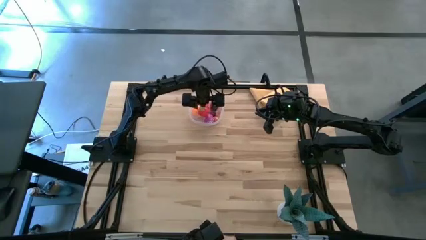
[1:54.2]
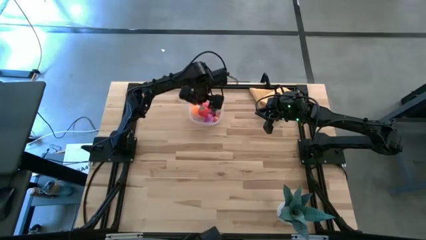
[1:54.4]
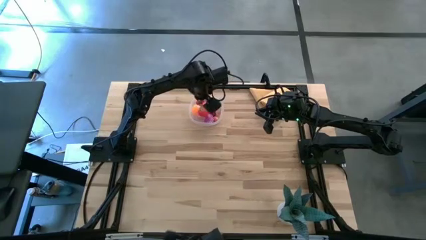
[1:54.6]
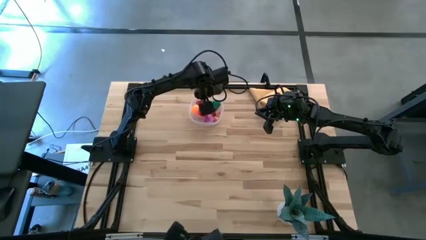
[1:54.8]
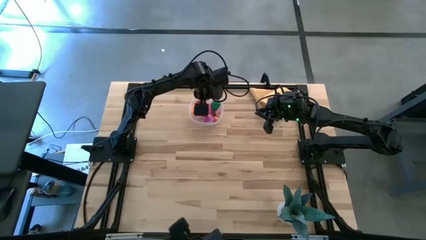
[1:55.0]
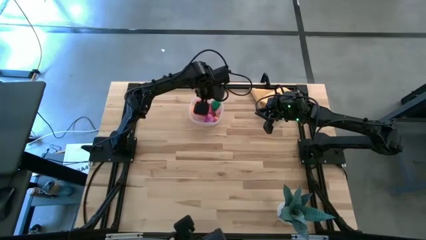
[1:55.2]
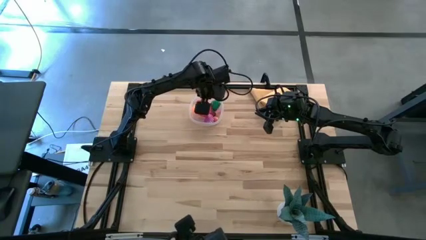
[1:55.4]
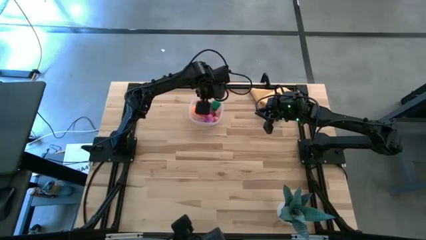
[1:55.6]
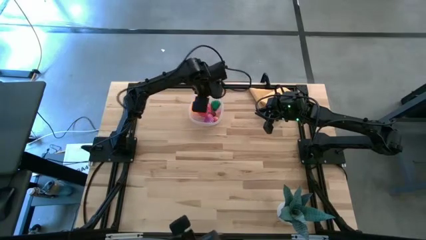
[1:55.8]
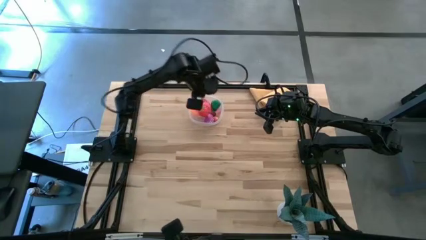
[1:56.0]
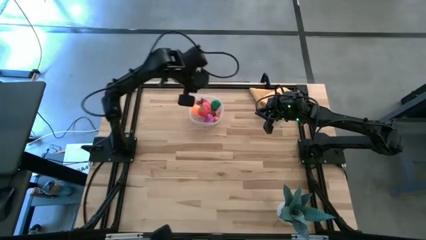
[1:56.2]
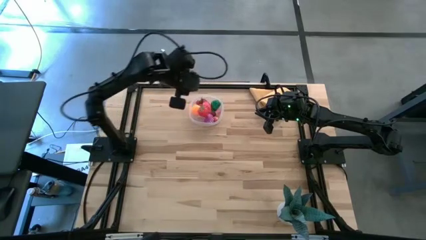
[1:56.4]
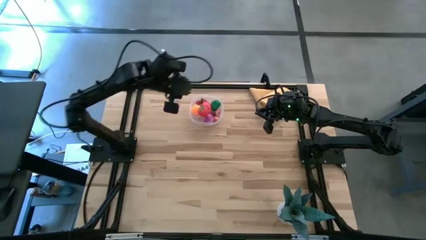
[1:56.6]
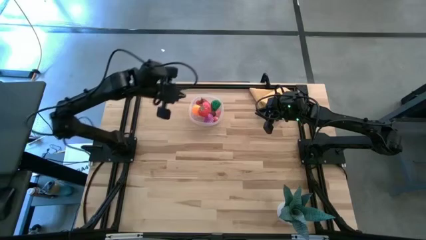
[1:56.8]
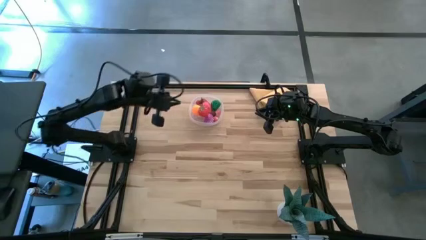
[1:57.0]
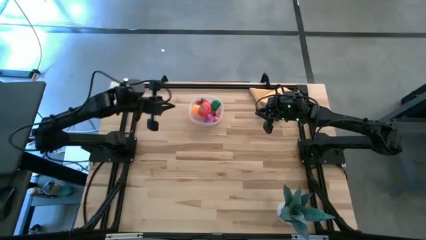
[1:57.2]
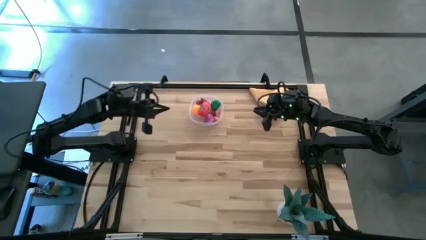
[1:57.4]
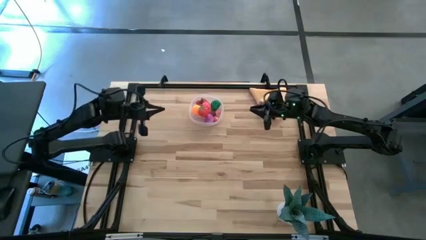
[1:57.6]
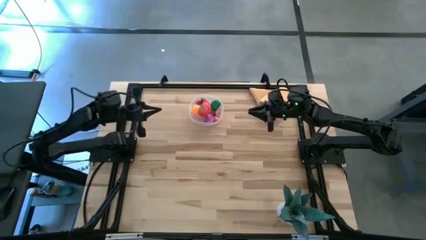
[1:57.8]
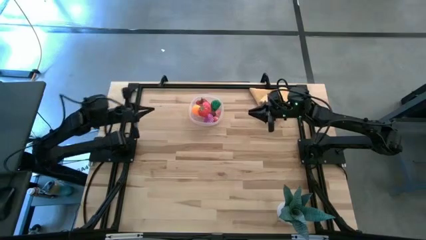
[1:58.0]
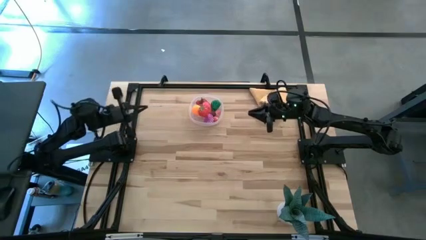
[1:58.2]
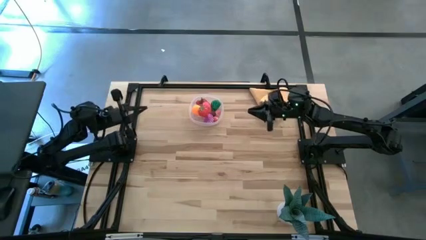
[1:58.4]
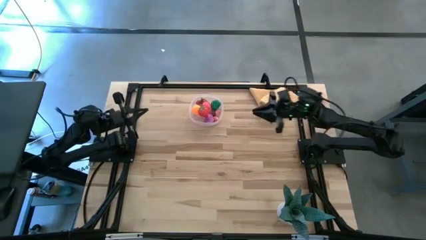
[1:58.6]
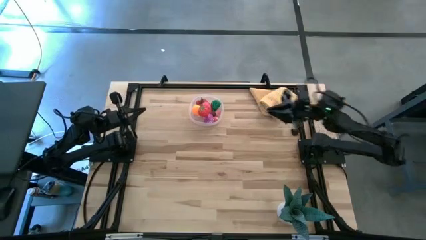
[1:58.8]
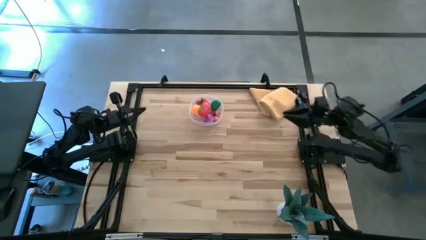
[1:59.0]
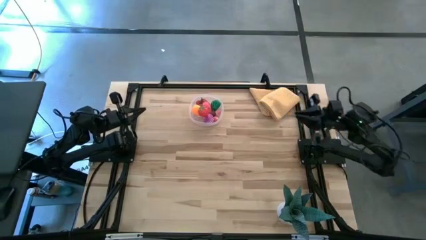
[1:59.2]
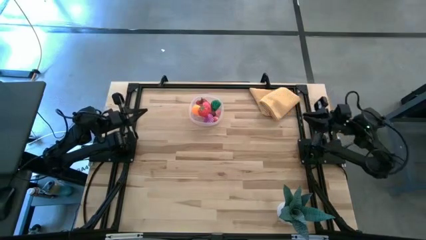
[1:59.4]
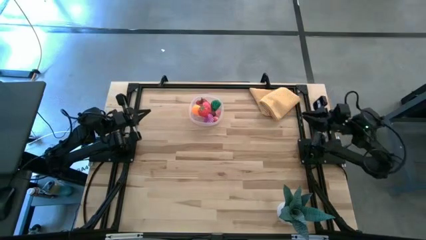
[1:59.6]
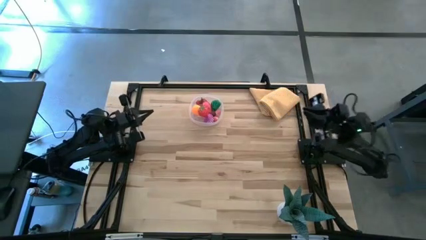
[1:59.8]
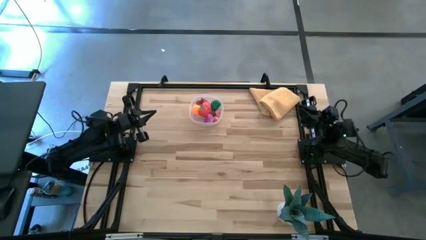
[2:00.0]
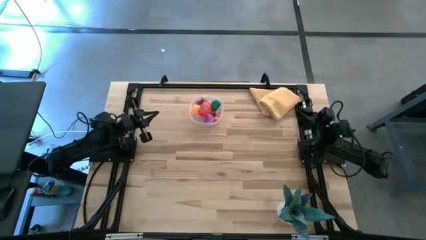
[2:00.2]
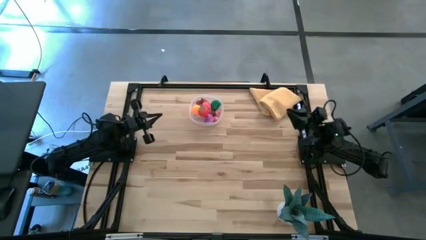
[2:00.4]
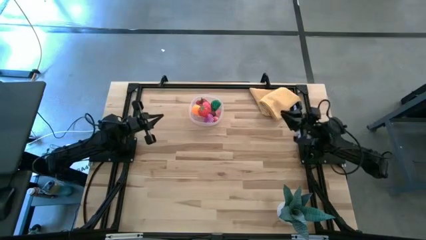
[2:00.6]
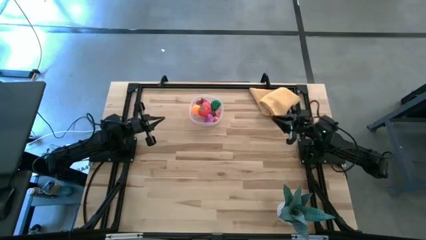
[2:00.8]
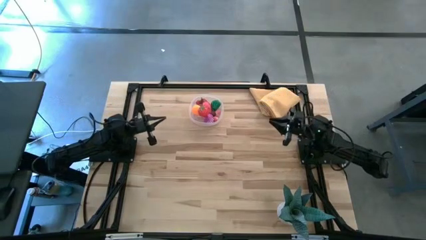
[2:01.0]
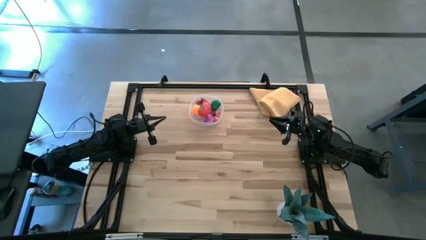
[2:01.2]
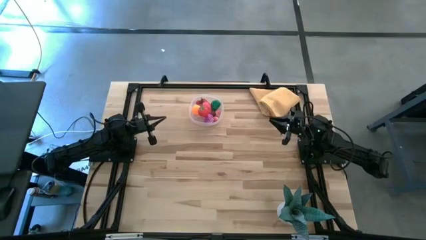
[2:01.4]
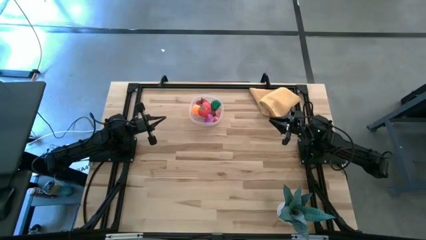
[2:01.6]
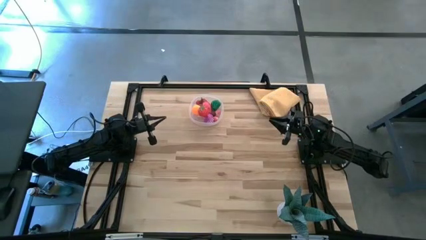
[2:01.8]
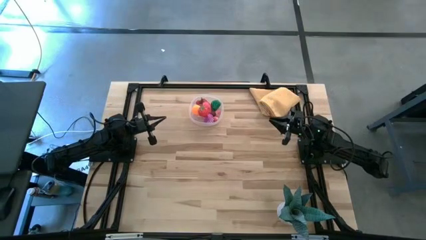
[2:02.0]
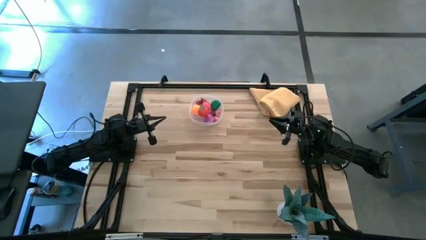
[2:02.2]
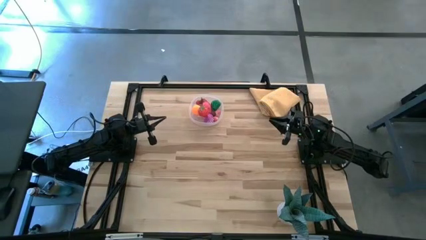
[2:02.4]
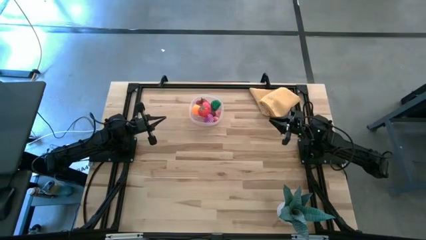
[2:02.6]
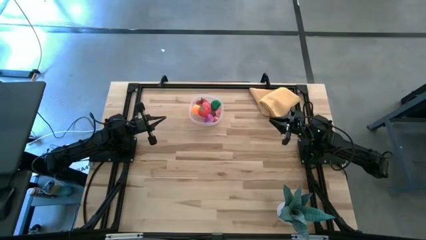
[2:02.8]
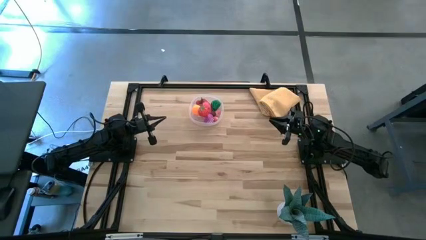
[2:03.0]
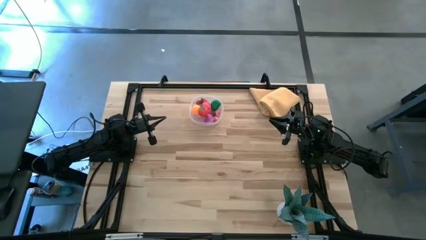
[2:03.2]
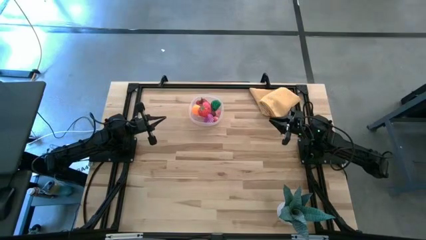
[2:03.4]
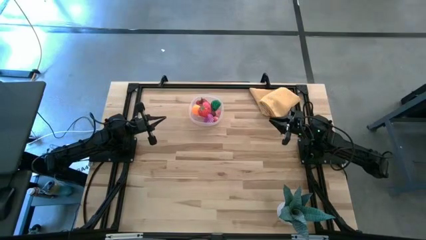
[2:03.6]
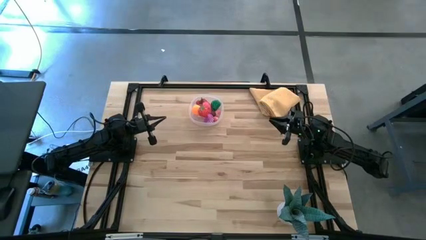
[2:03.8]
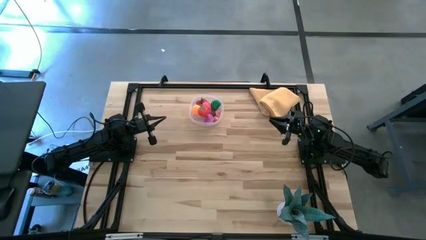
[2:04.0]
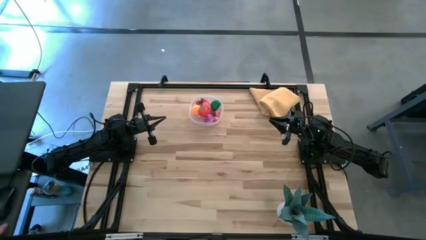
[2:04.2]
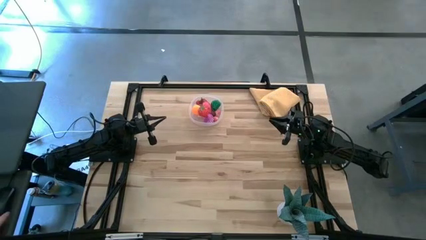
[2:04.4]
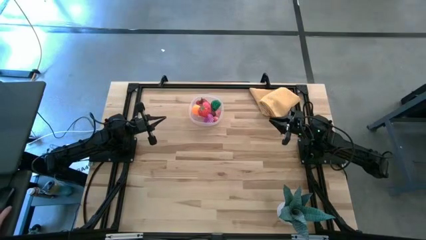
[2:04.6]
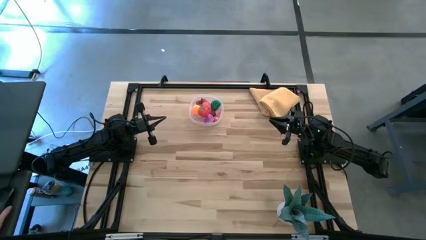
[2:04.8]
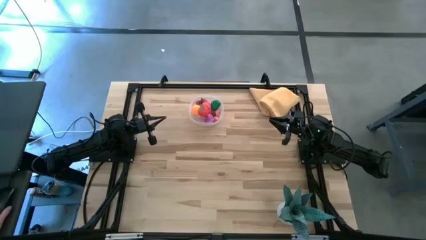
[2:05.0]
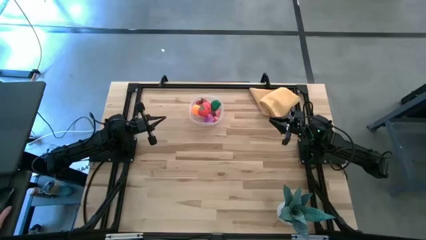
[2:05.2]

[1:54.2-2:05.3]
Task: Pick and placing Produce into tupperware
Return to Home Position

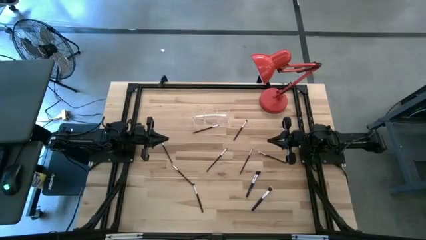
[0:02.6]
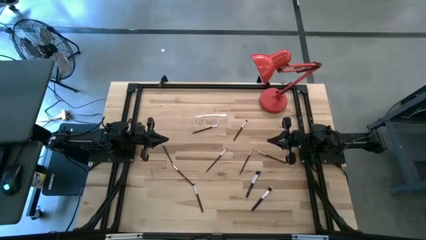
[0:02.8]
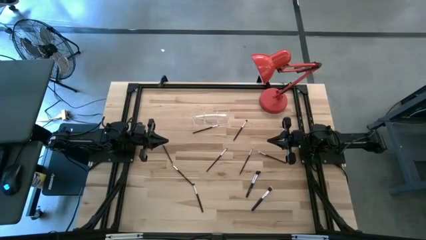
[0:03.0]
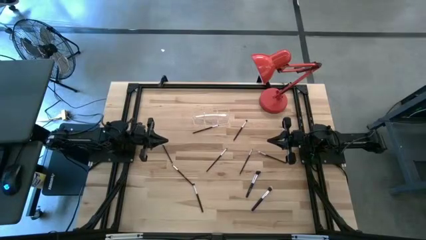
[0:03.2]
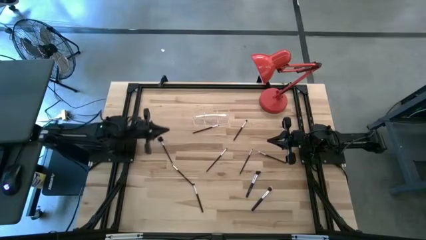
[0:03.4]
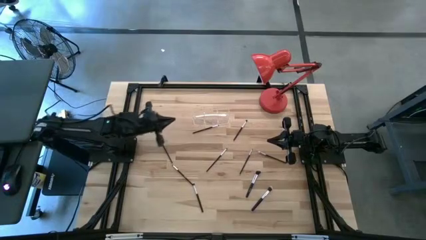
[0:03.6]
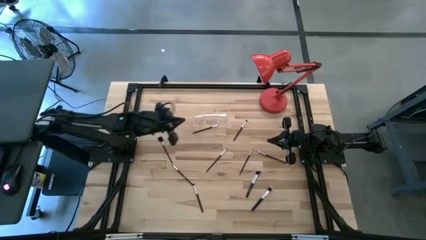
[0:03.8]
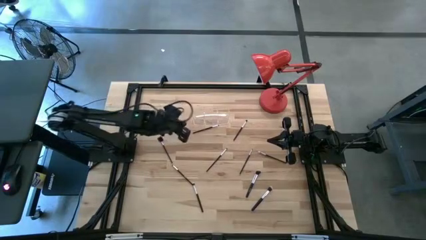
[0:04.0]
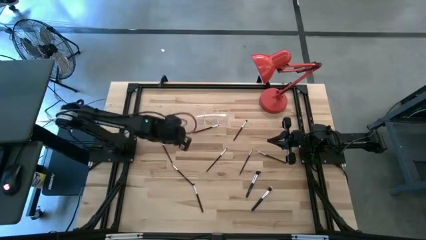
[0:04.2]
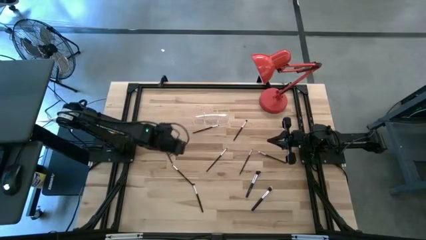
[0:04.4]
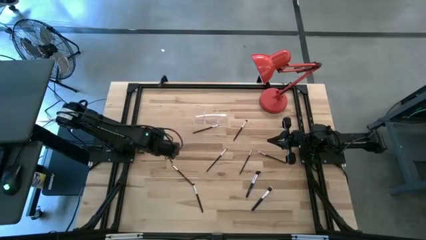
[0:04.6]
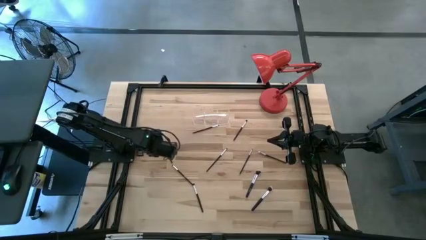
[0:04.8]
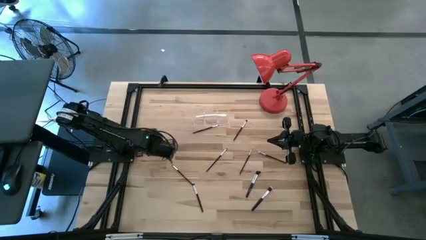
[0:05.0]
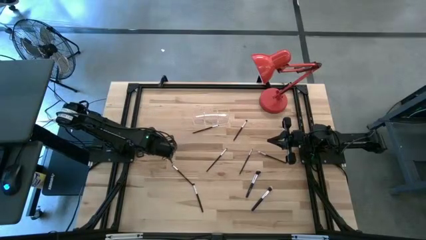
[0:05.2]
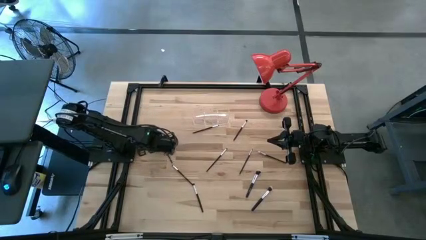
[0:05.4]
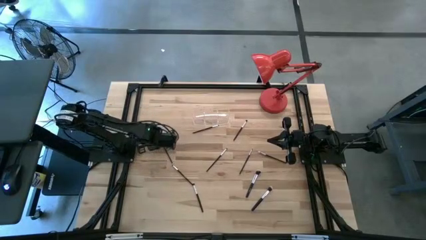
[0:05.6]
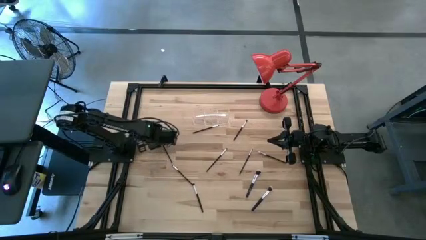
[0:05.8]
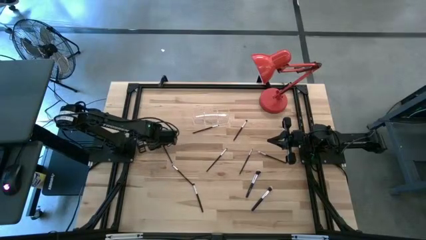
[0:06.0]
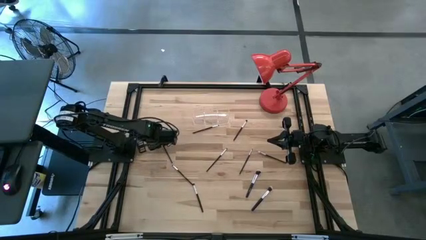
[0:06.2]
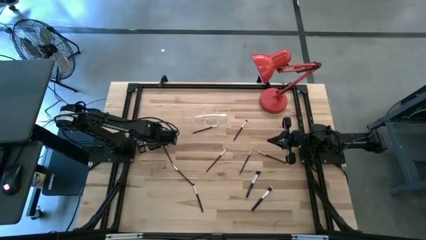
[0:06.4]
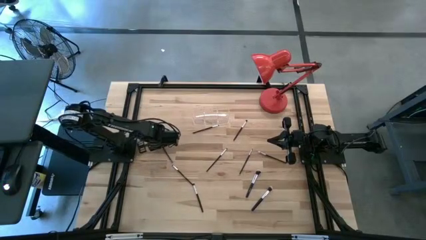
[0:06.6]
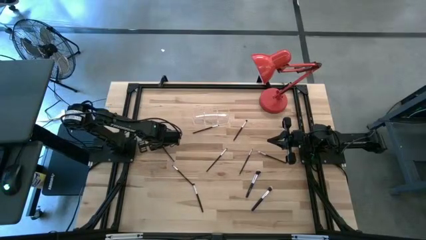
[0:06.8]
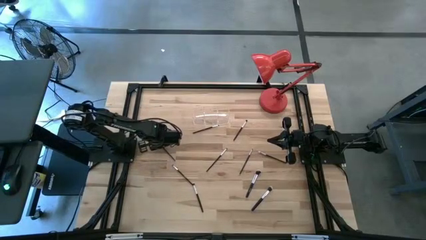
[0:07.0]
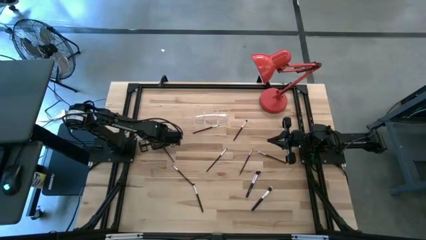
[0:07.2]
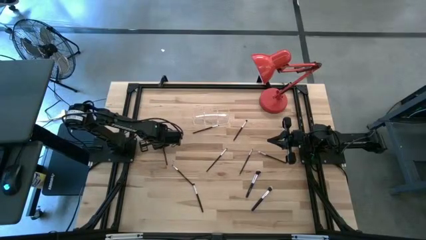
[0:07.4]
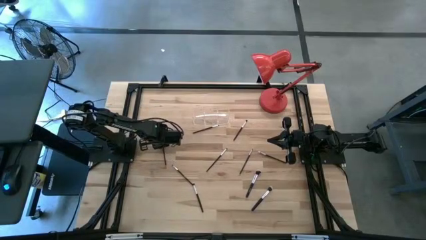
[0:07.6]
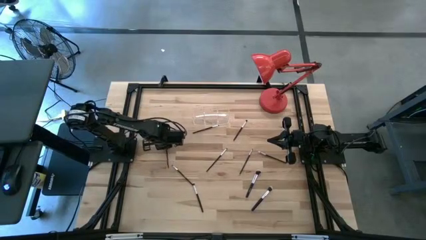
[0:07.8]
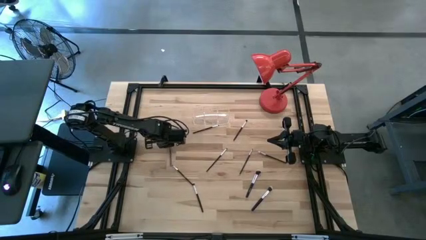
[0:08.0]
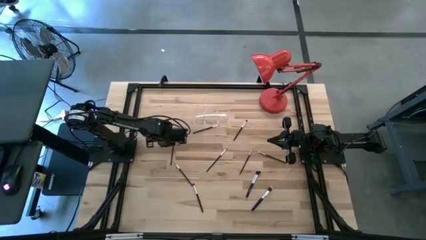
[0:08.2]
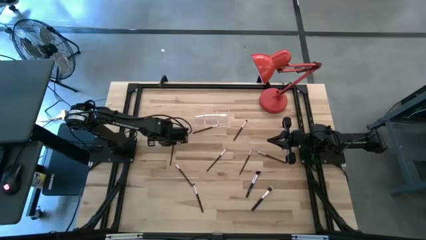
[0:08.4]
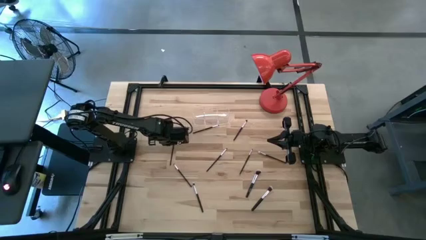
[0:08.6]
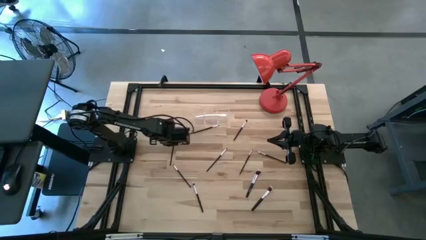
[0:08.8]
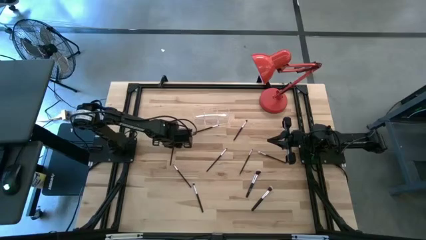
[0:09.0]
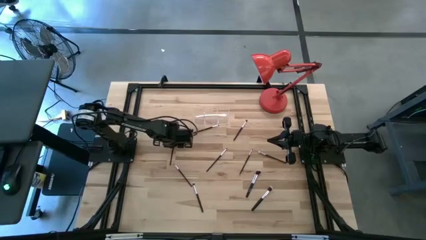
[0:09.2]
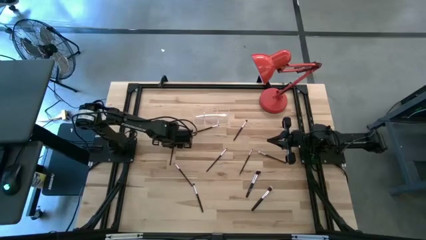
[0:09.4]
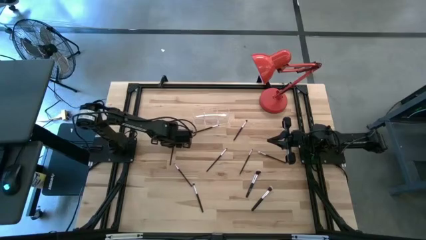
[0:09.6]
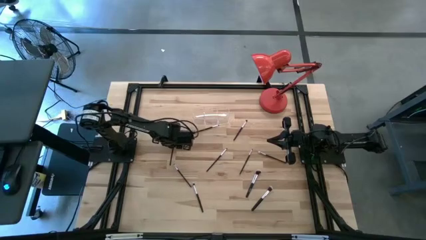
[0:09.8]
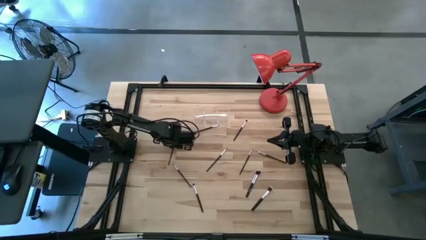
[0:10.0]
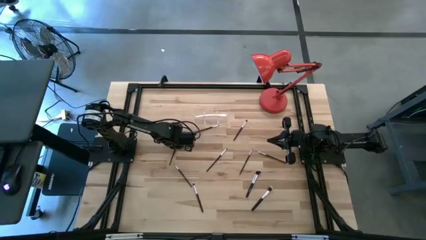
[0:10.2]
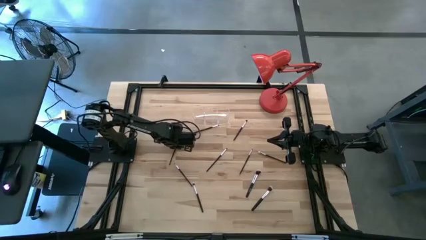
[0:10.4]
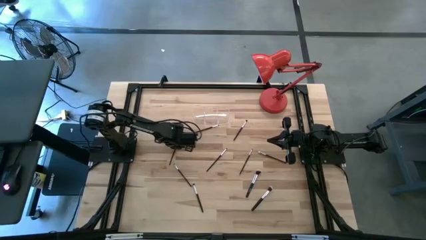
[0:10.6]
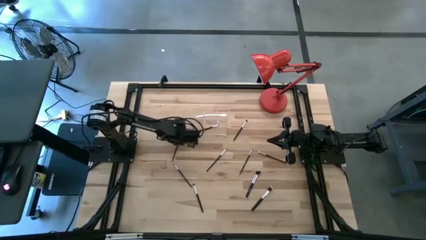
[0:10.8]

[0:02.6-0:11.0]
Task: Put items in baskets/containers
Put the black eye groomer brush into the transparent organizer
